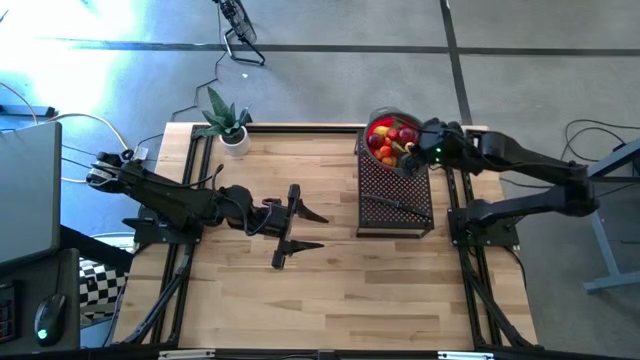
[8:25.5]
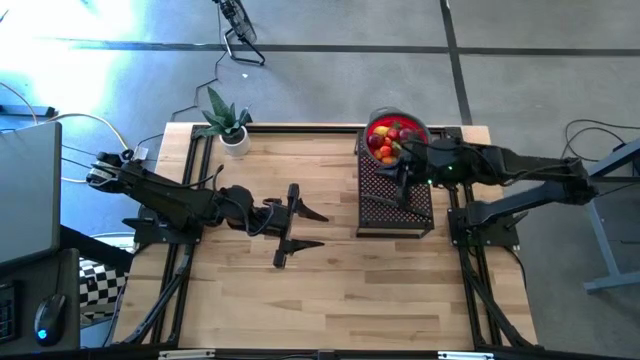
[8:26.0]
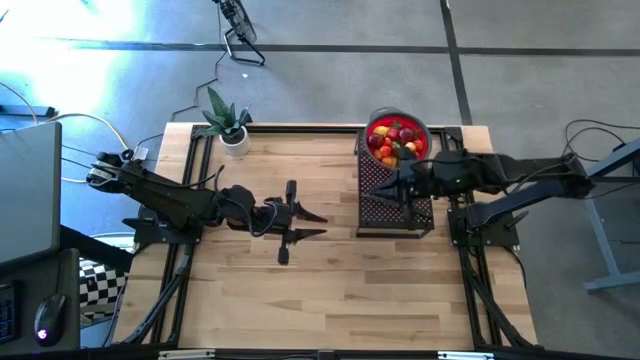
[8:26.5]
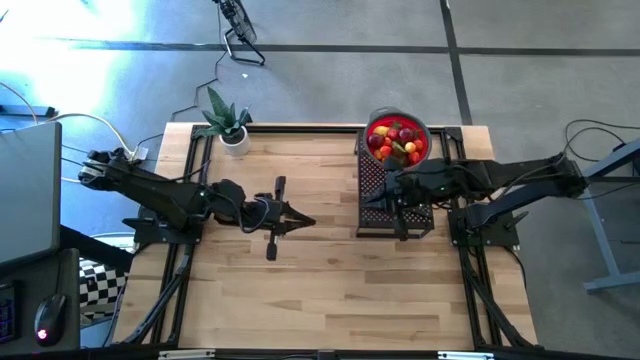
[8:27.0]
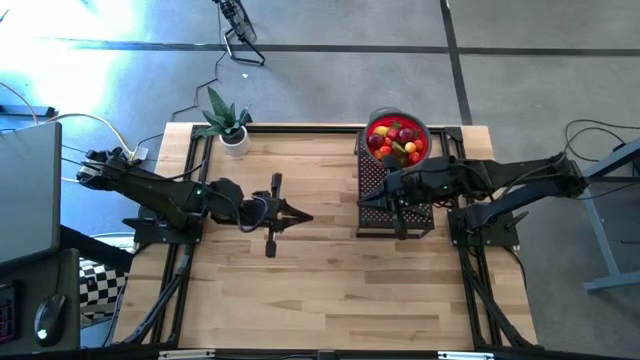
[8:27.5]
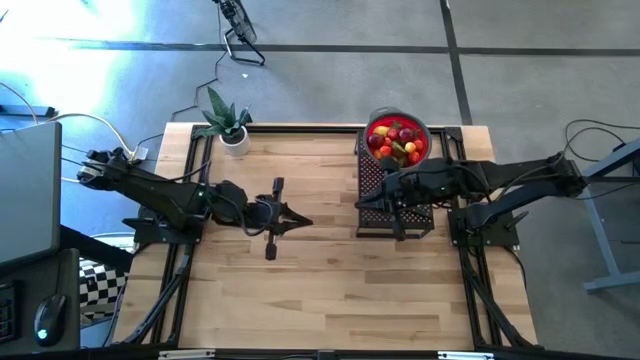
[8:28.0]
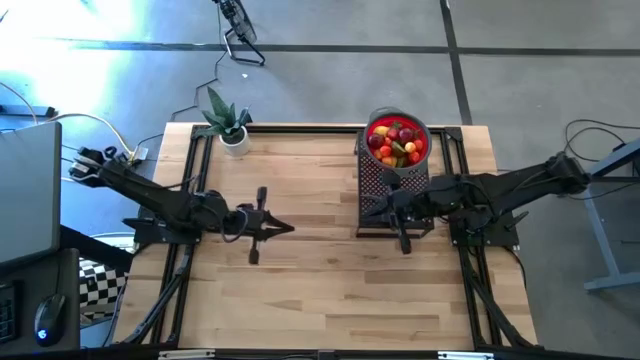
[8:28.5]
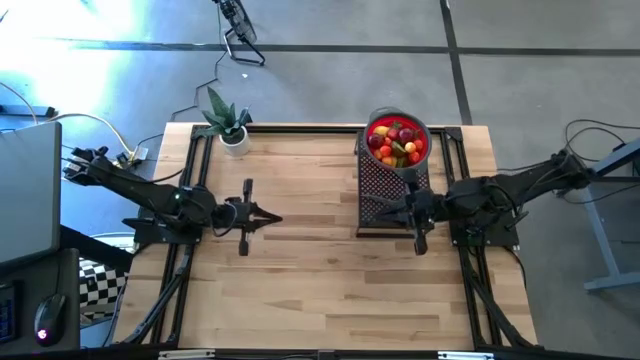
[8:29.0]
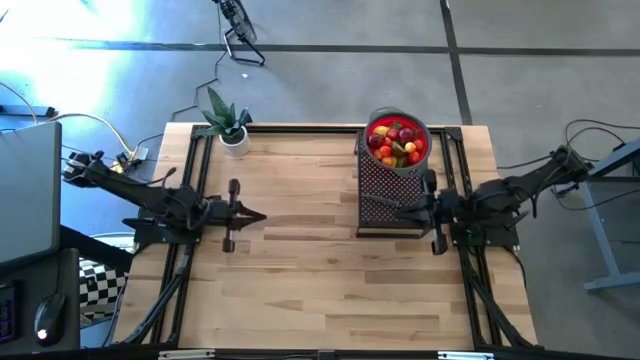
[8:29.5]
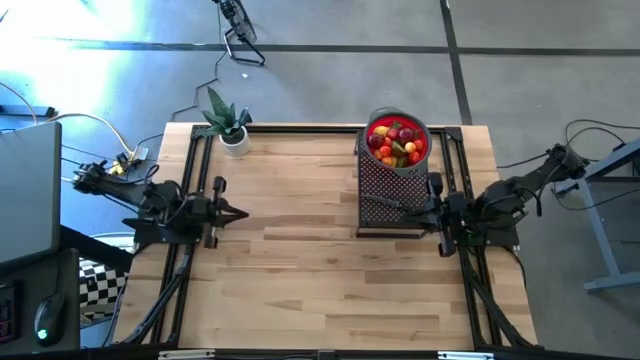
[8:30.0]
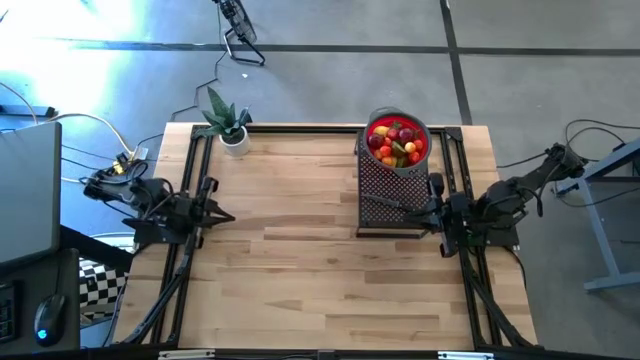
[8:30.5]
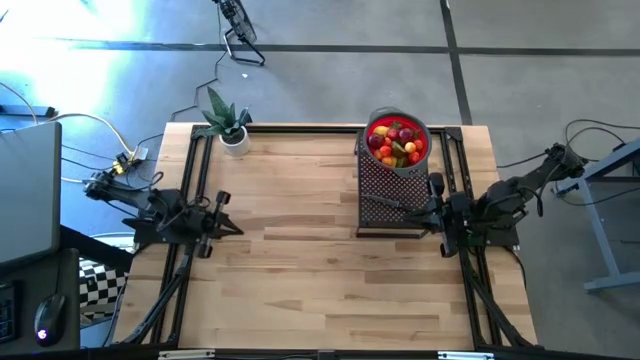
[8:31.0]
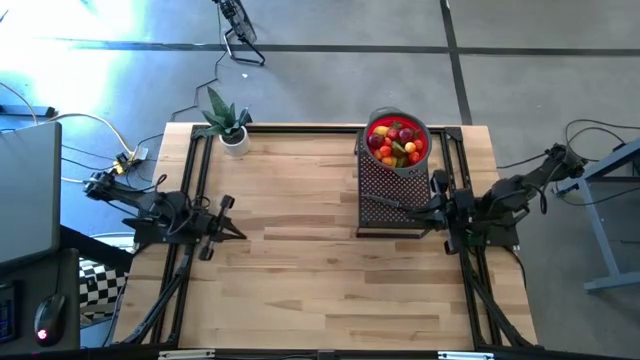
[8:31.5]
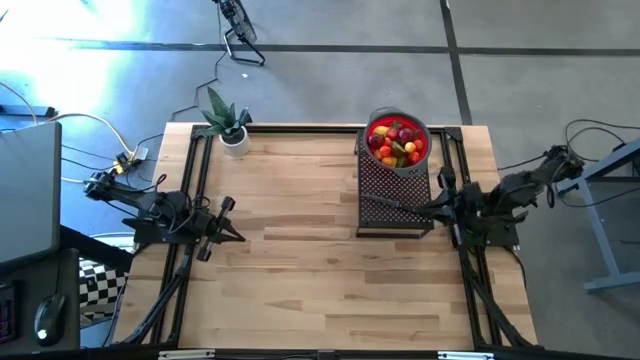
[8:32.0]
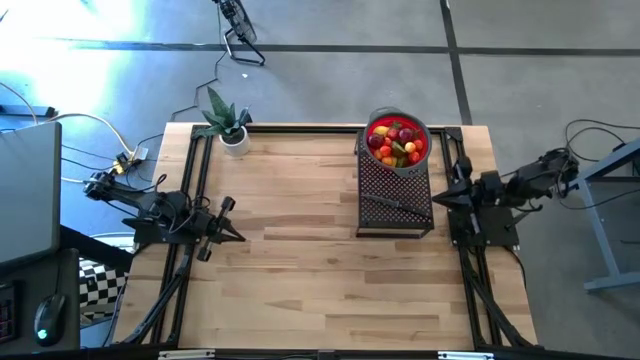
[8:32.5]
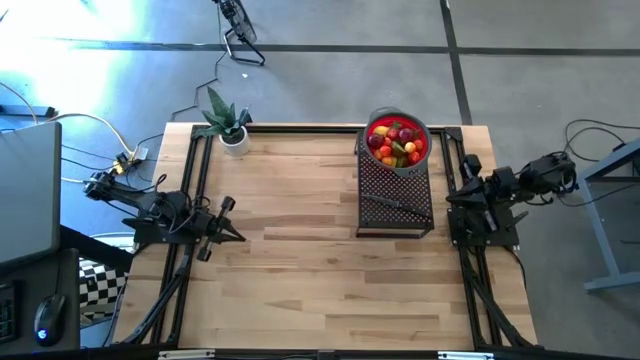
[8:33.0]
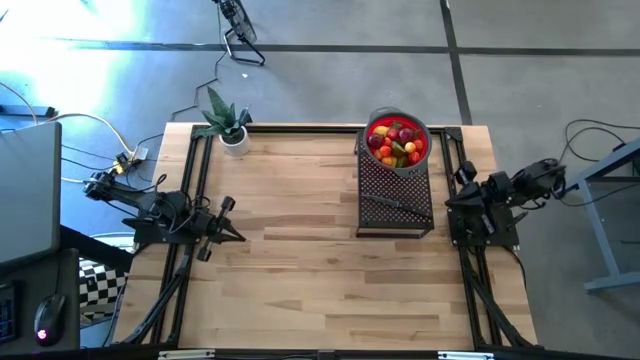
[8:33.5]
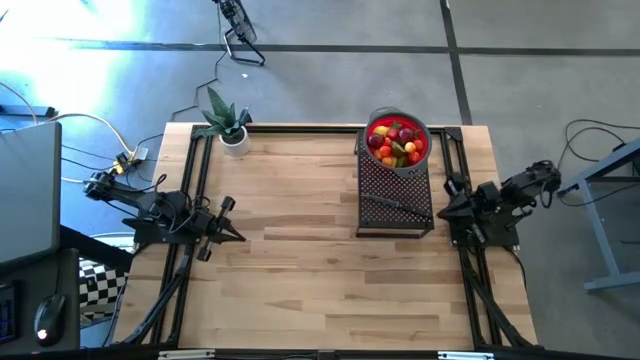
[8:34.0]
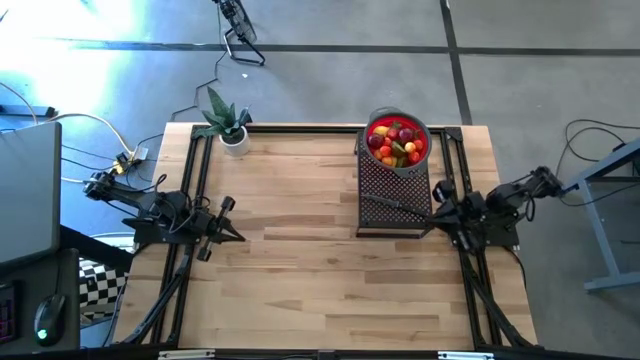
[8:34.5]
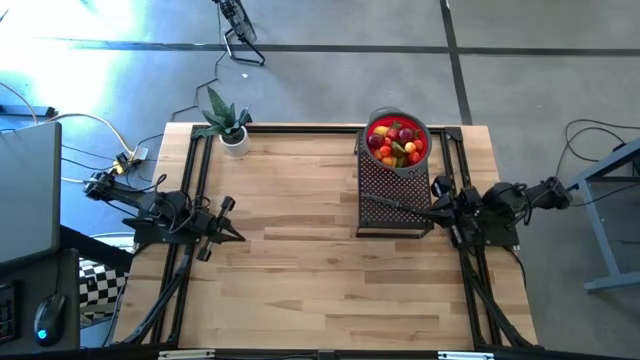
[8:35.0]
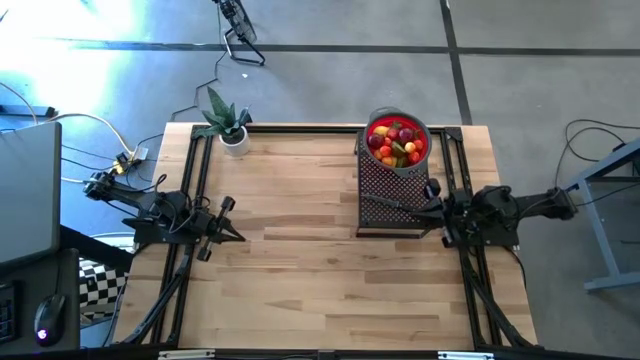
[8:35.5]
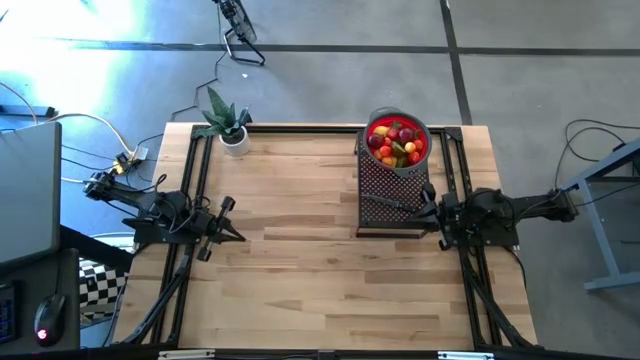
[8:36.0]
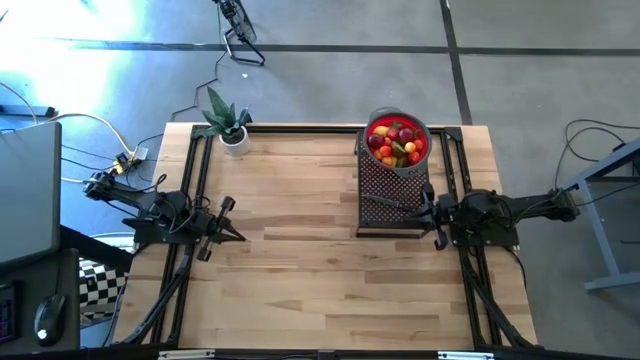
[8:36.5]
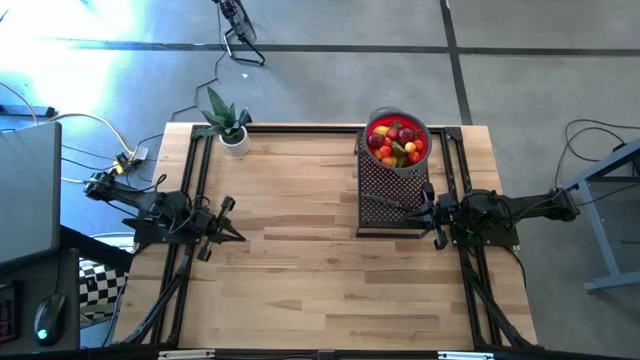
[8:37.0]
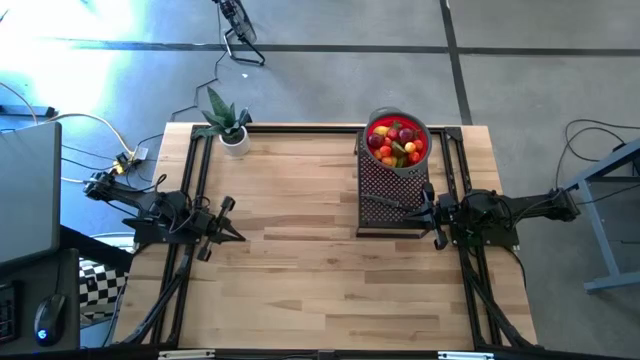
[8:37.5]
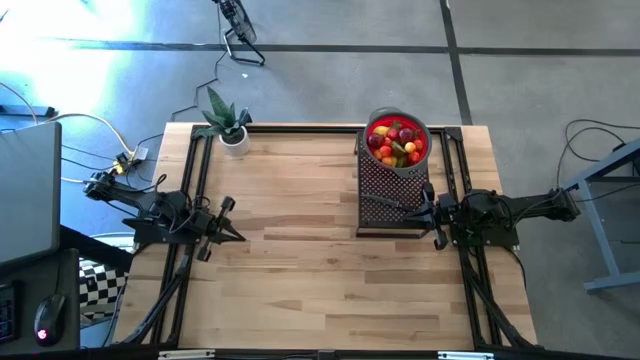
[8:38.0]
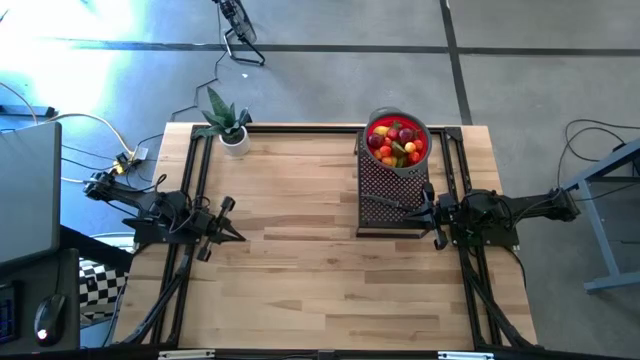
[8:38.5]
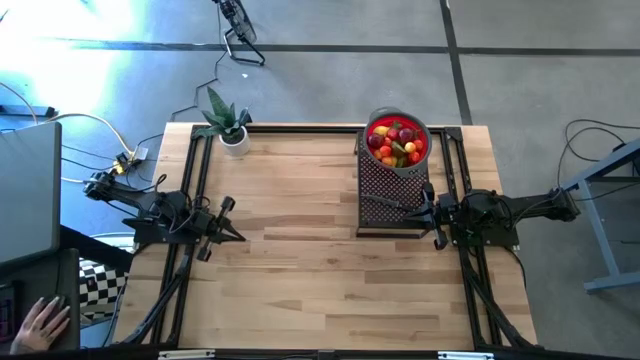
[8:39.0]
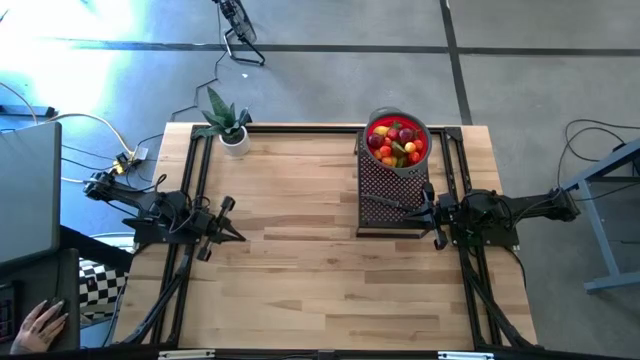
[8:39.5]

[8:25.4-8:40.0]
Task: Pick & Place Fruit
Return to Home Position

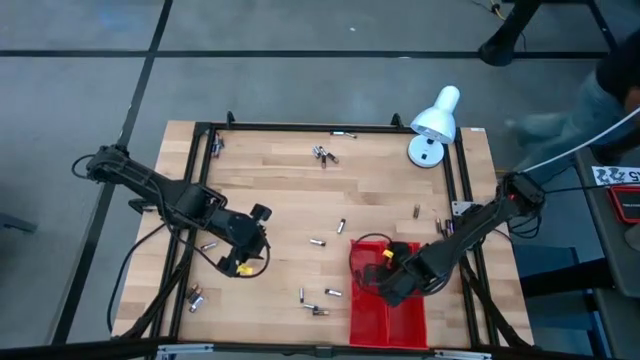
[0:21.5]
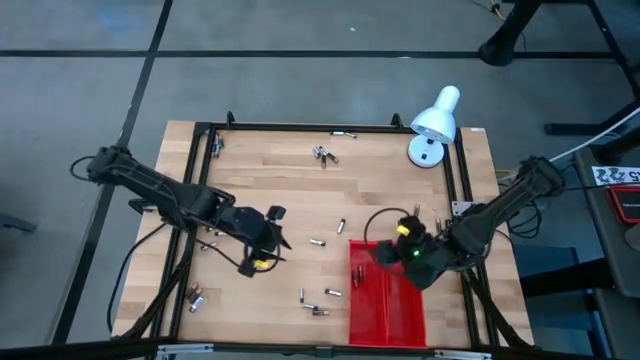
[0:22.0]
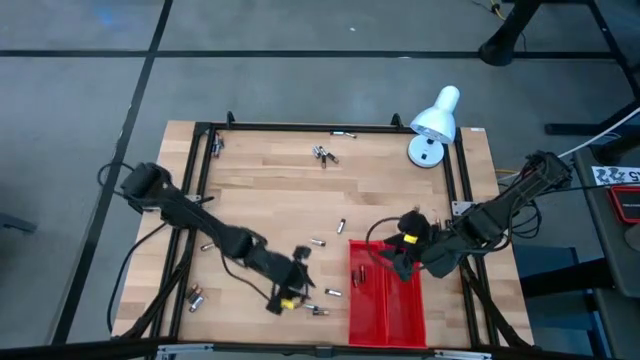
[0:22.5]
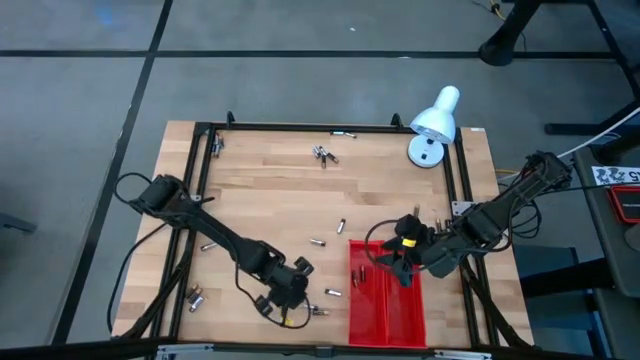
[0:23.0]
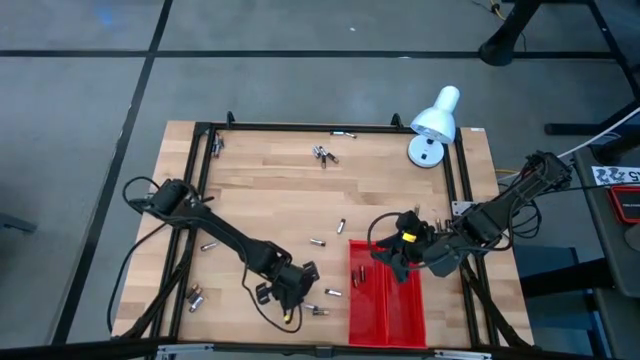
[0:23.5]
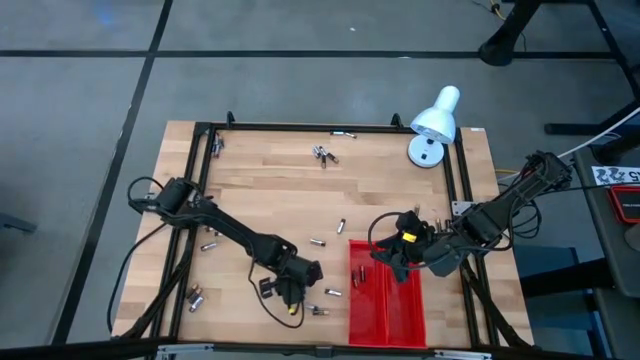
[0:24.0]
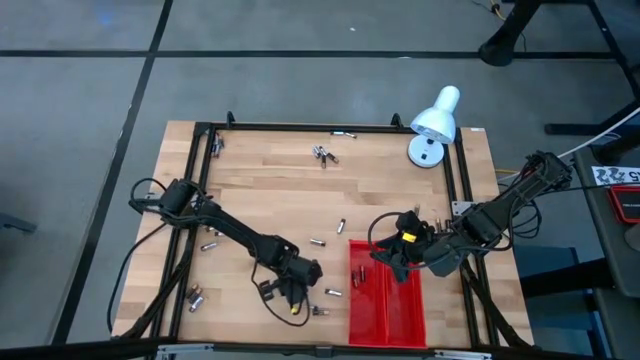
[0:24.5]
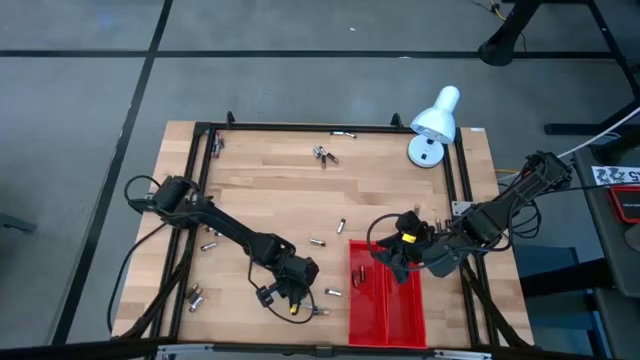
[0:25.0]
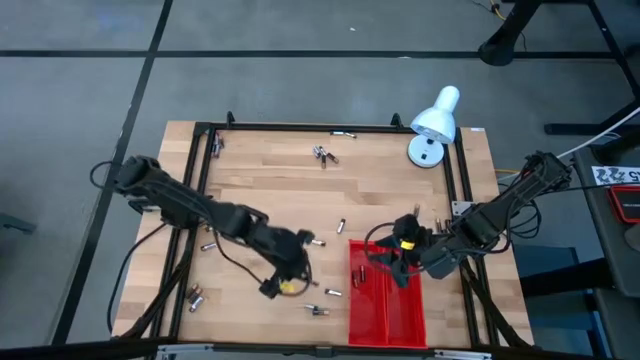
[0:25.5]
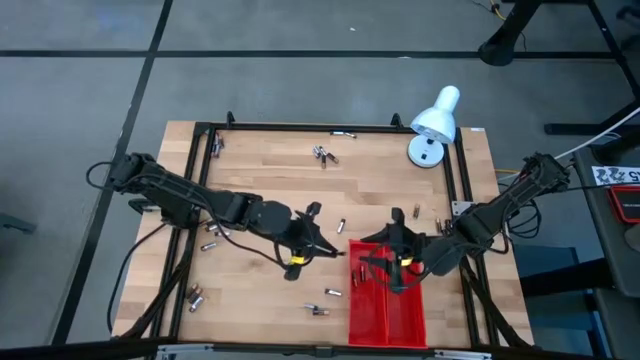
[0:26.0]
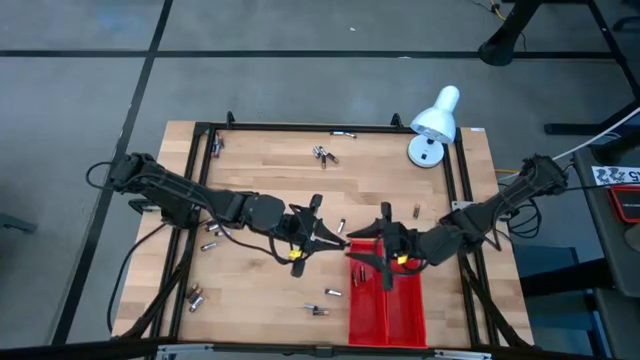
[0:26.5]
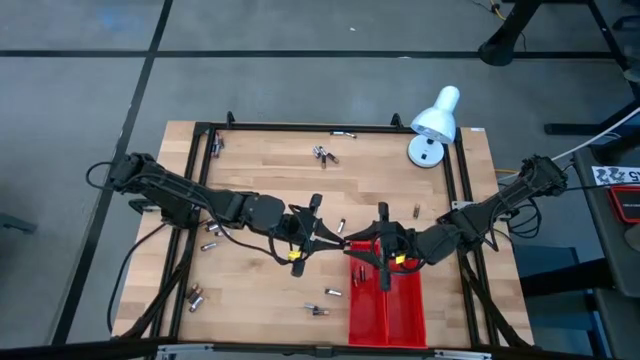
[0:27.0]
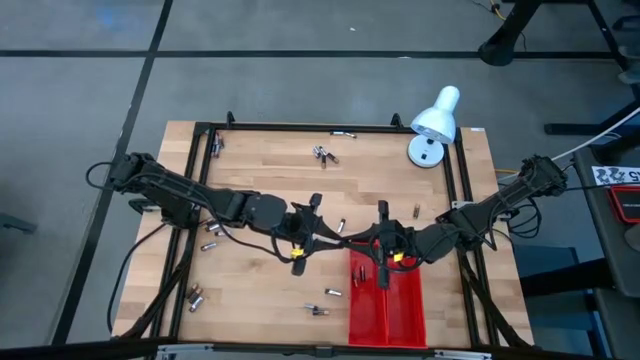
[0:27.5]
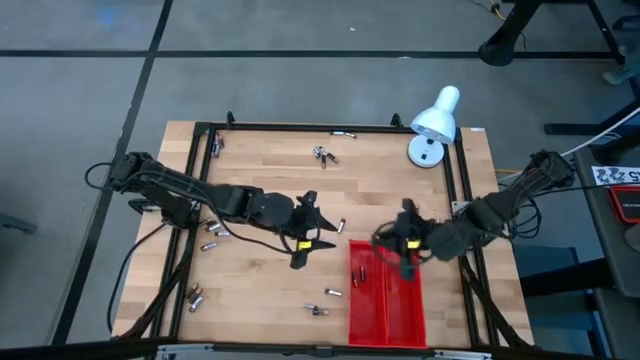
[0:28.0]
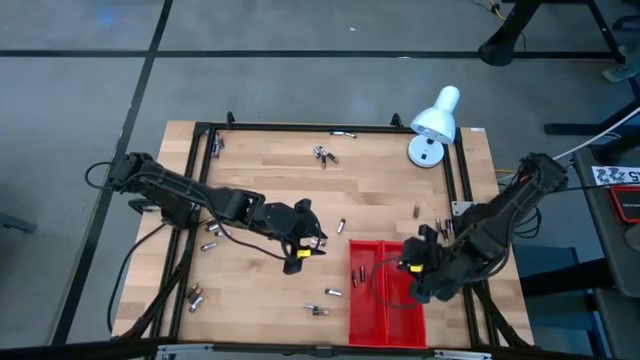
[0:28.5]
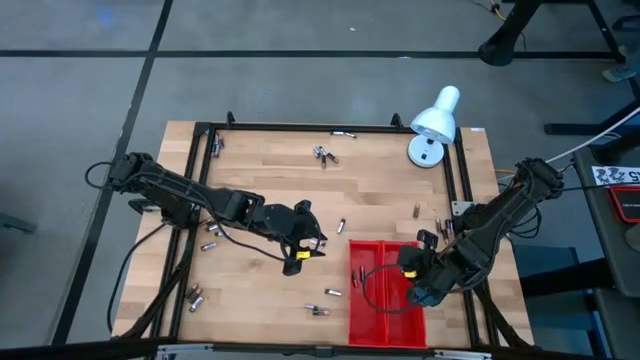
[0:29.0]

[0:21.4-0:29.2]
Task: Sort batteries
Put the silver battery into the right red bin
